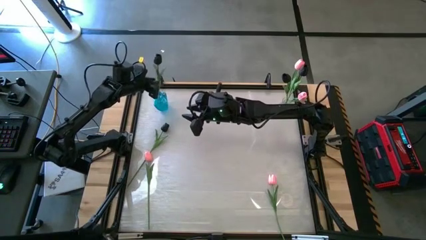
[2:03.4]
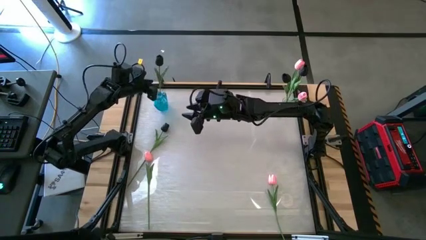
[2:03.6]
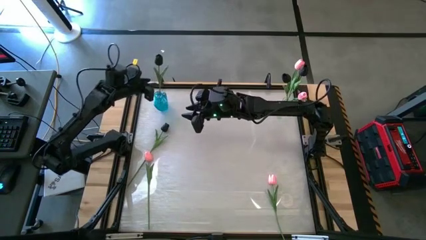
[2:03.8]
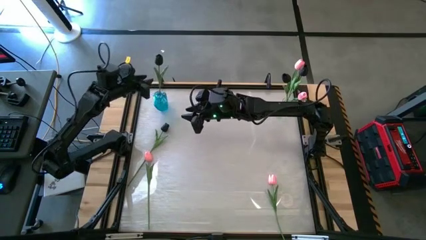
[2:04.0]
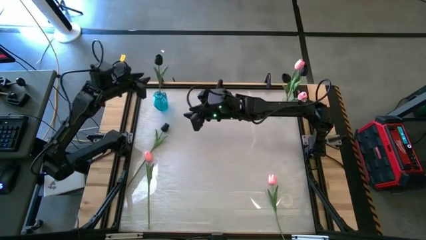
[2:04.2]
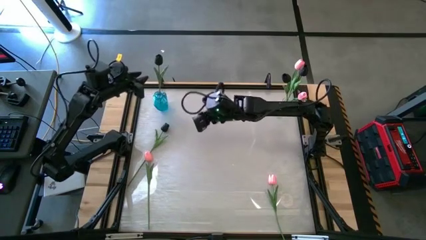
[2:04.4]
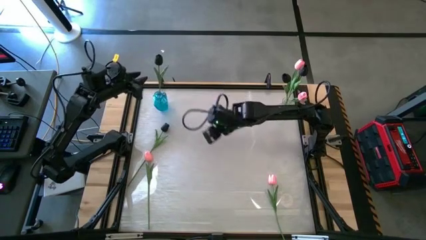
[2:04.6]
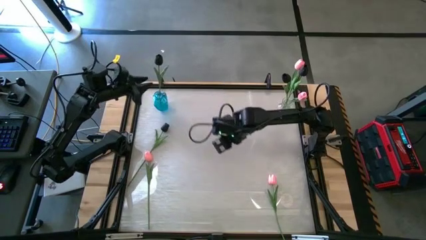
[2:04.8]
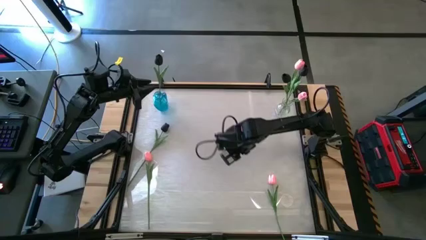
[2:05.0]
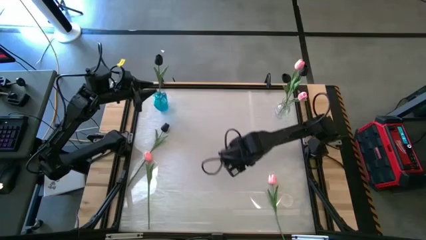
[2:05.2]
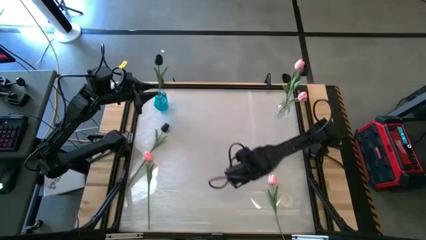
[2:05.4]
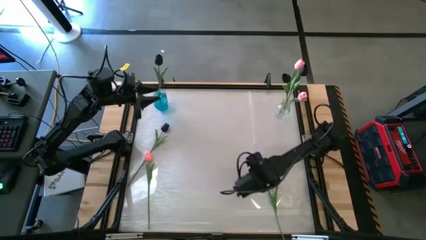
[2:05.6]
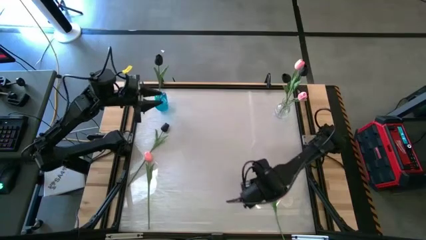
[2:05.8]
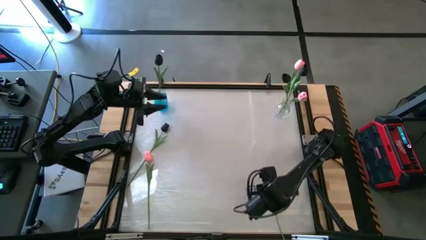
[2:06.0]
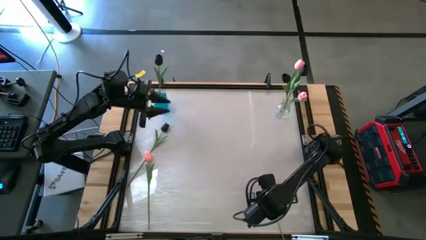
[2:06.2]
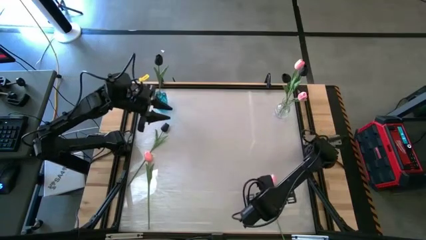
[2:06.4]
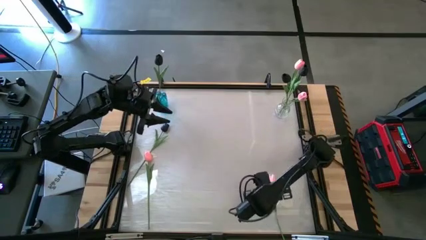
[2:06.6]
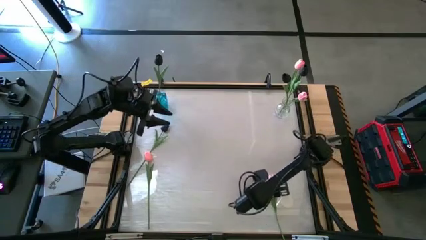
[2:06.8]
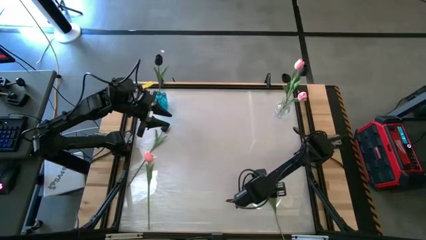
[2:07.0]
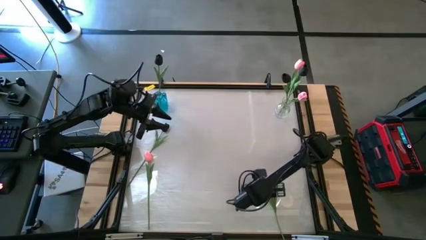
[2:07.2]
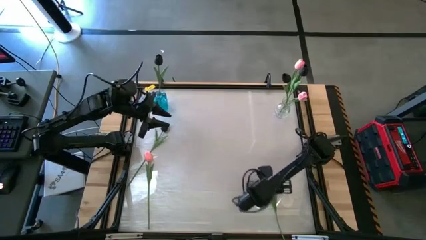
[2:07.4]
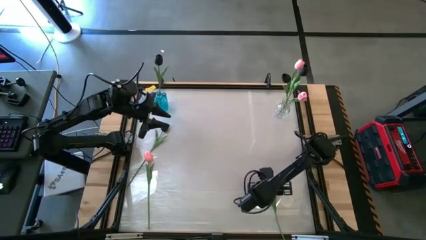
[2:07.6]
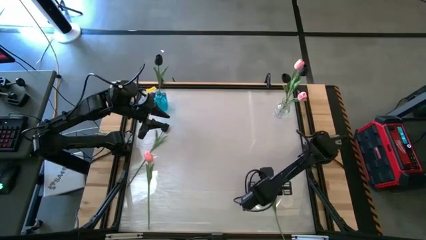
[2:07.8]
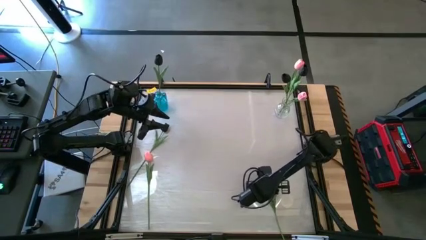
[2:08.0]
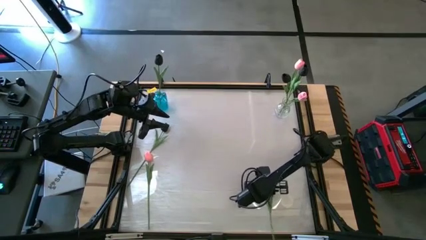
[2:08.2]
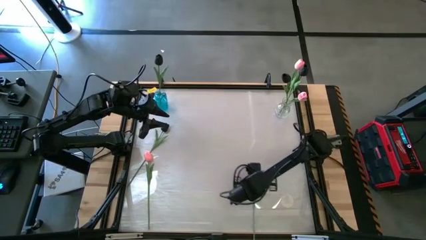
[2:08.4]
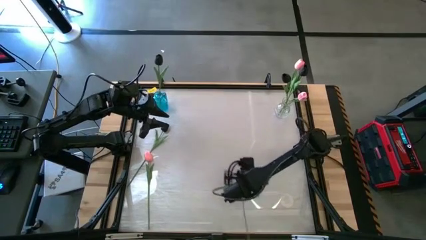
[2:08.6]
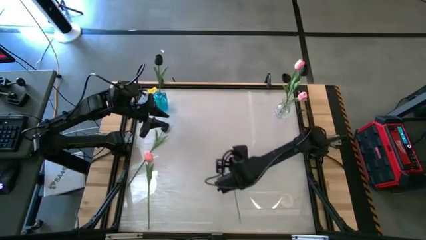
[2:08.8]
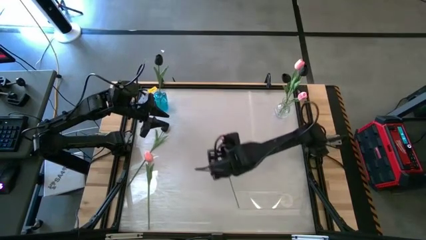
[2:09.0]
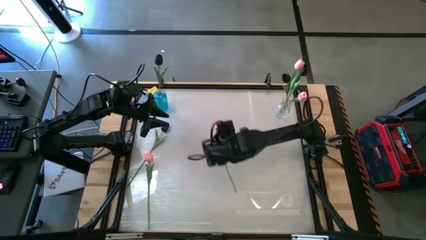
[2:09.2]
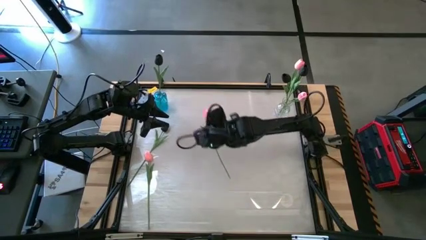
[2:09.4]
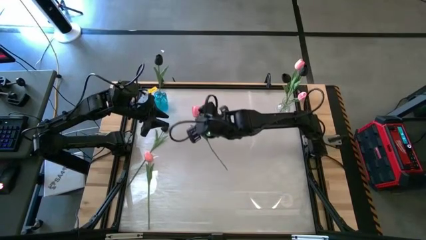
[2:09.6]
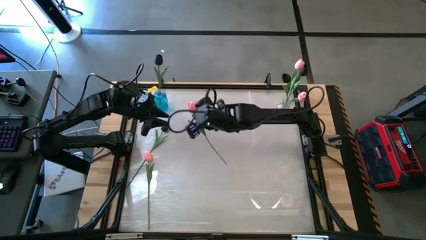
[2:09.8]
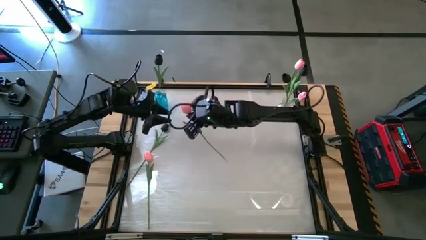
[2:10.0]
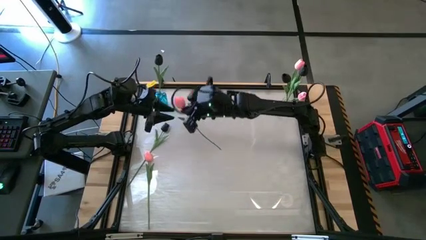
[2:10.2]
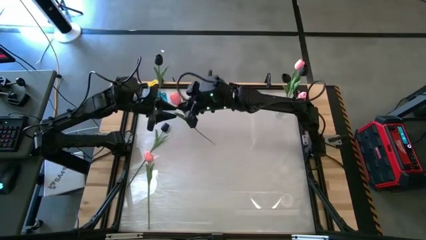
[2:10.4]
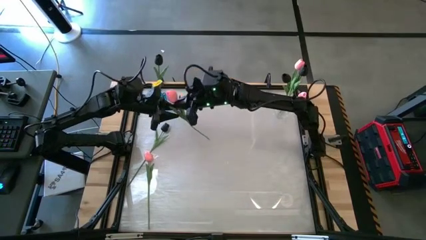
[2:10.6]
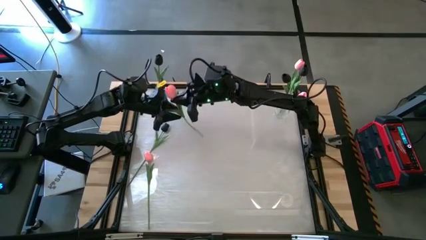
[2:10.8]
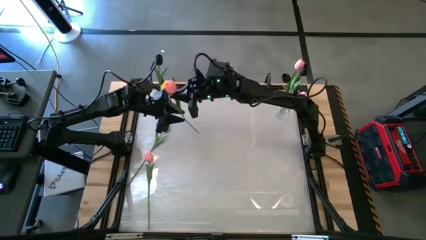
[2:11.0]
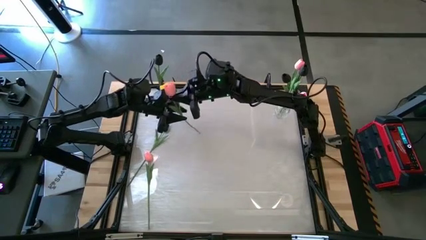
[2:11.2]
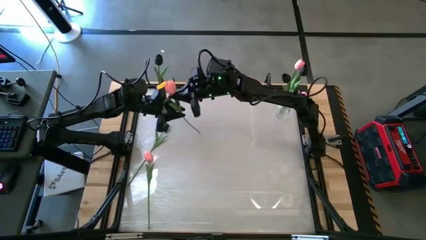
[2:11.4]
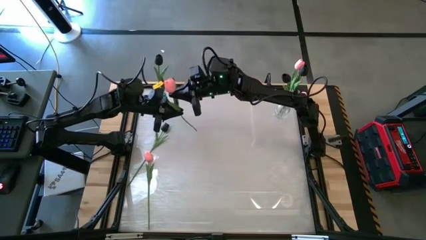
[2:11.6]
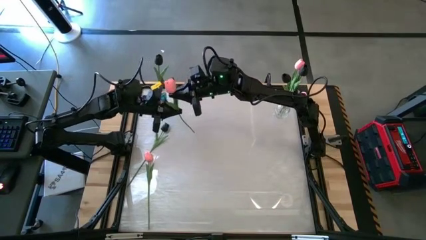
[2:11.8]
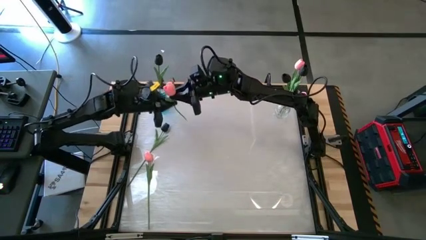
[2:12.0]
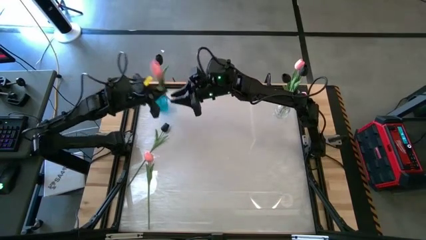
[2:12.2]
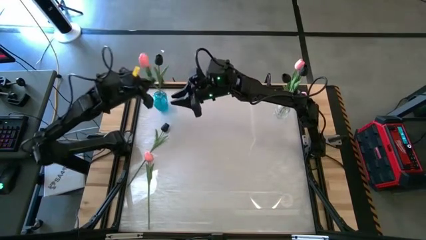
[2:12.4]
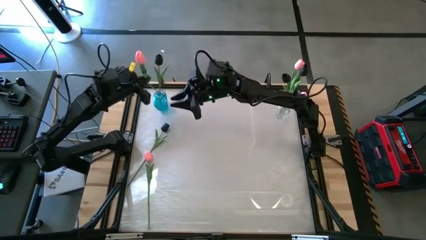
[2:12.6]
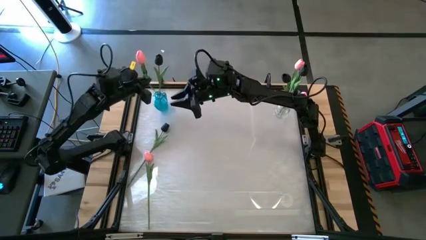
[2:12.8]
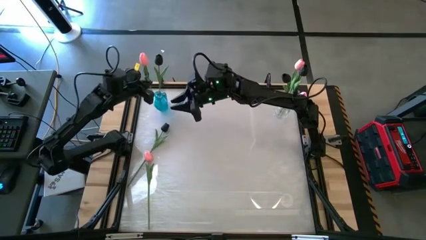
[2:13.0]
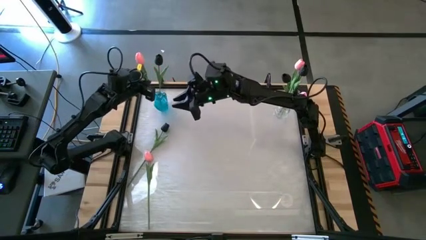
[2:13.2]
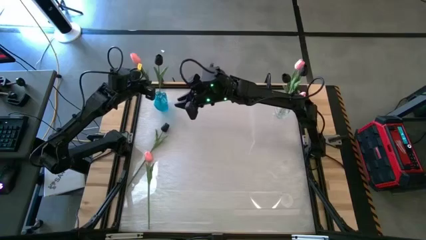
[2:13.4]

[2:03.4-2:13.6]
Task: Sort flowers into vase by color
Put the pink flower into the blue vase

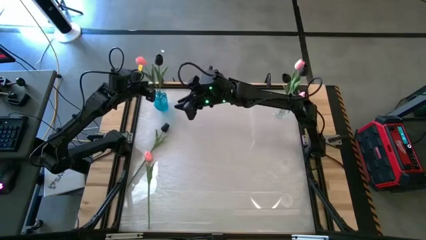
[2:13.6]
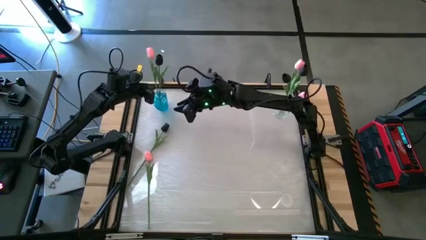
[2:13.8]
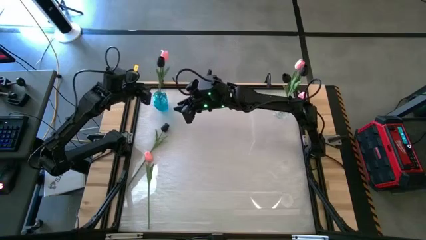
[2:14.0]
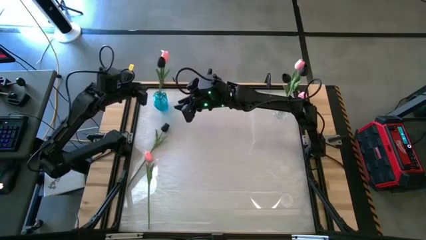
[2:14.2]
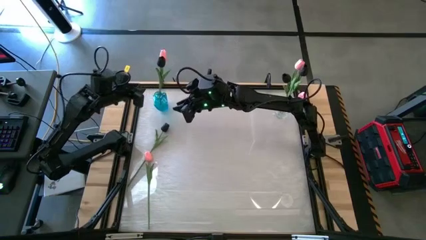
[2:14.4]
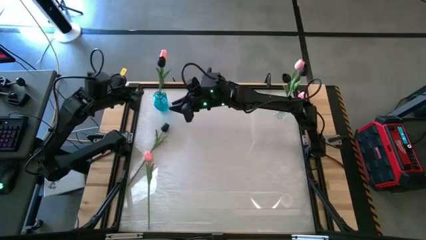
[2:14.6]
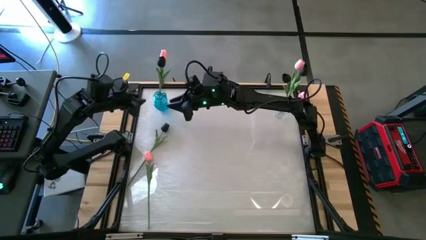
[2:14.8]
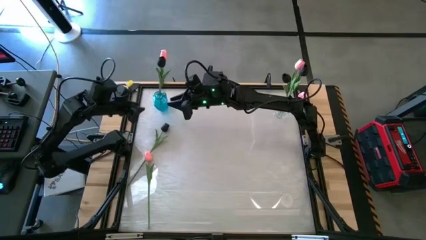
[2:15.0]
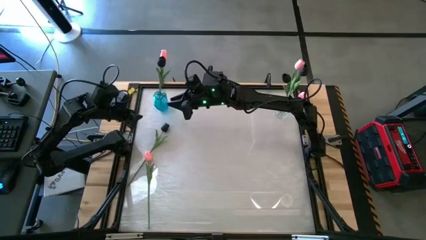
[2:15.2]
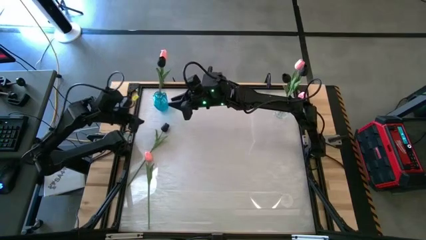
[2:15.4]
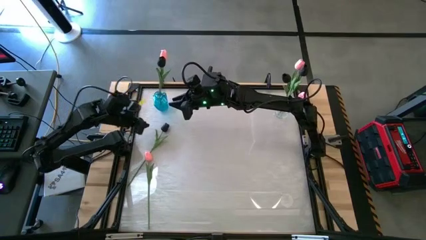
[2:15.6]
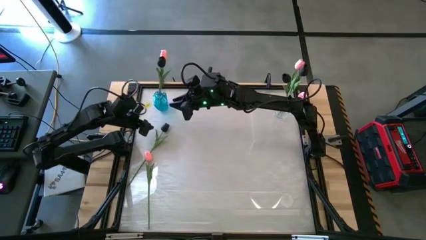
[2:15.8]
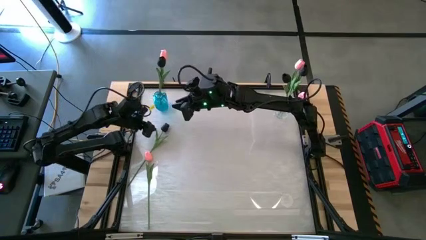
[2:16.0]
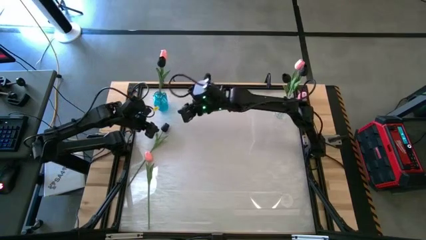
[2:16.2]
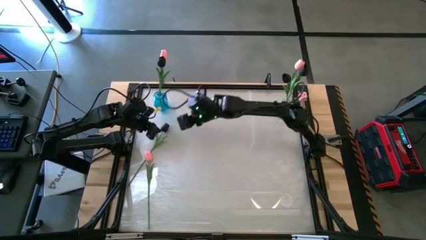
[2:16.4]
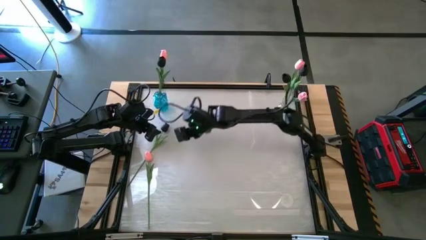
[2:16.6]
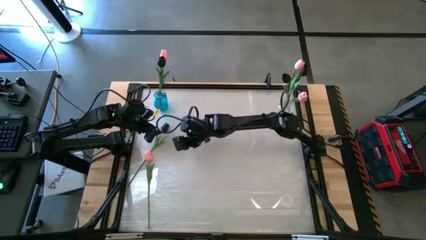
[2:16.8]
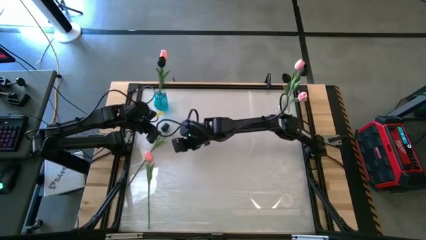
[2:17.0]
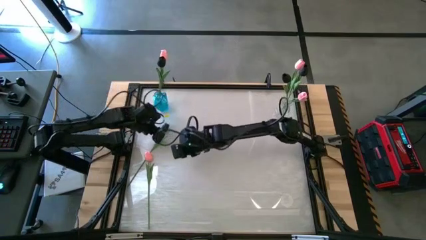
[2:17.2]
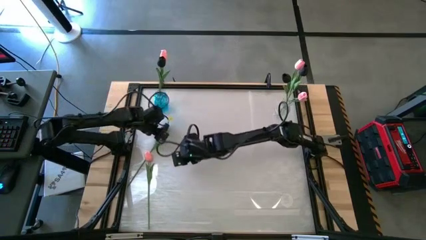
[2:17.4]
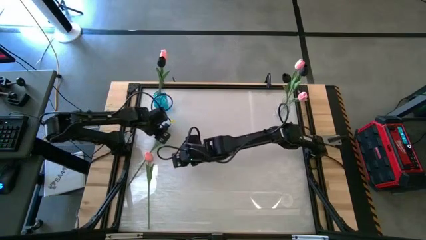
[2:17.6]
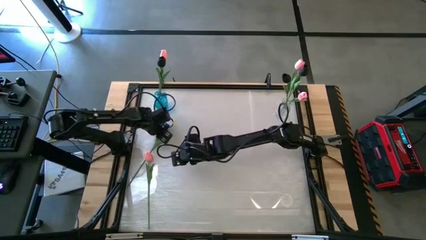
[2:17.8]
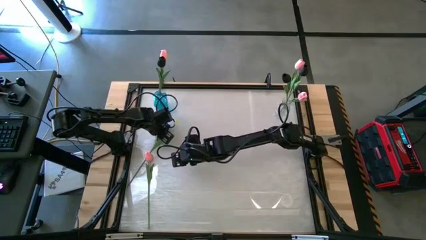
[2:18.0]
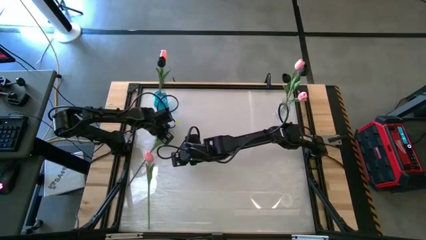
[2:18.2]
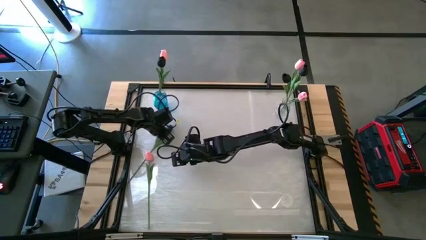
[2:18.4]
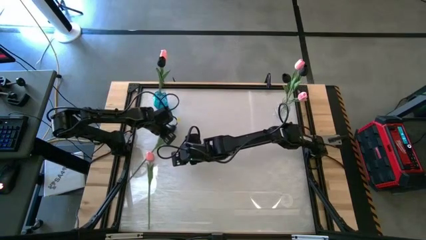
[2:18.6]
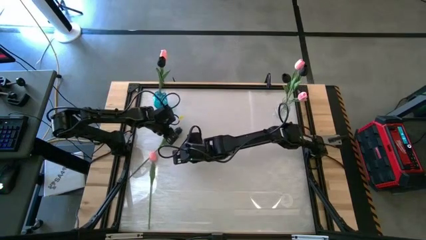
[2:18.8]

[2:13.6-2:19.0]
Put the black flower into the blue vase
